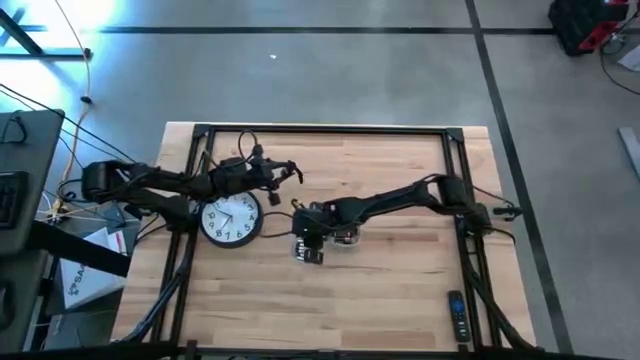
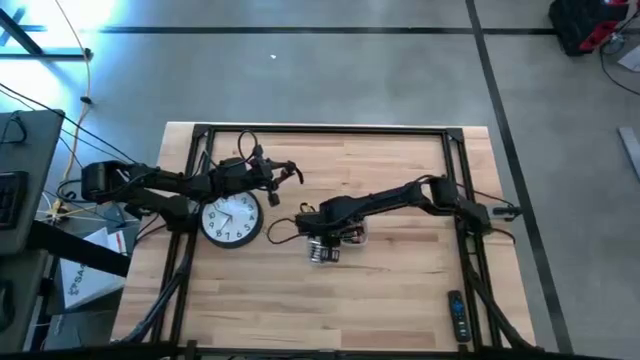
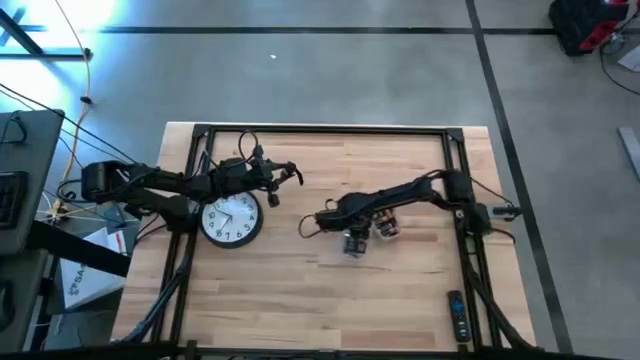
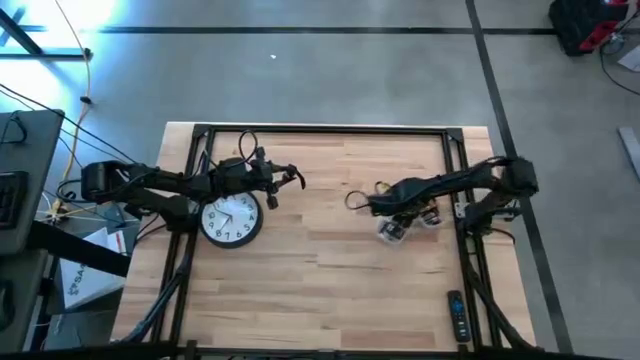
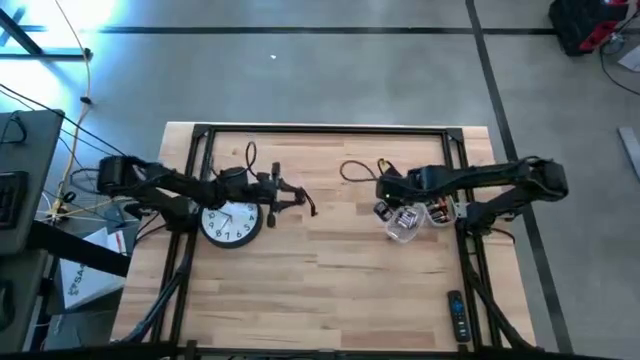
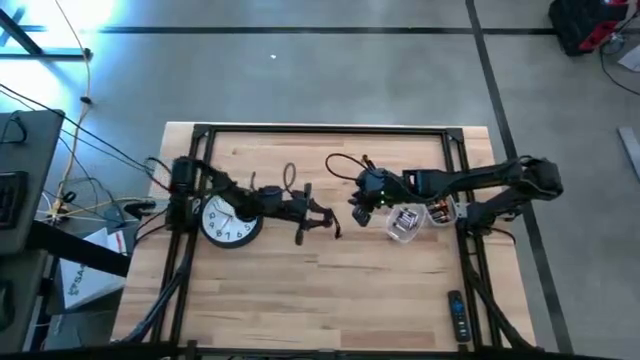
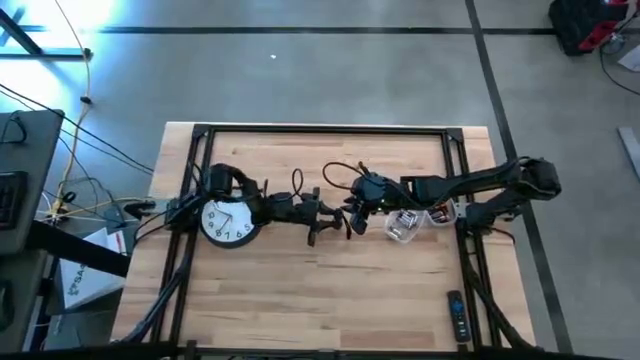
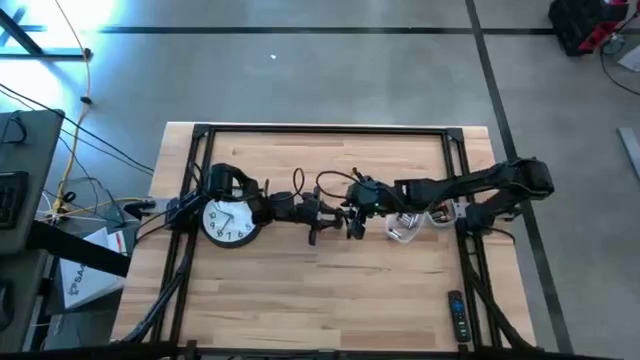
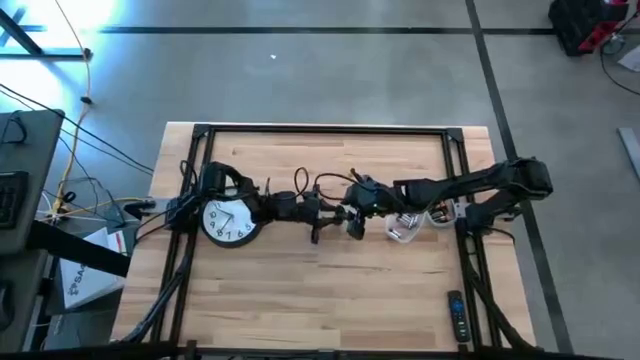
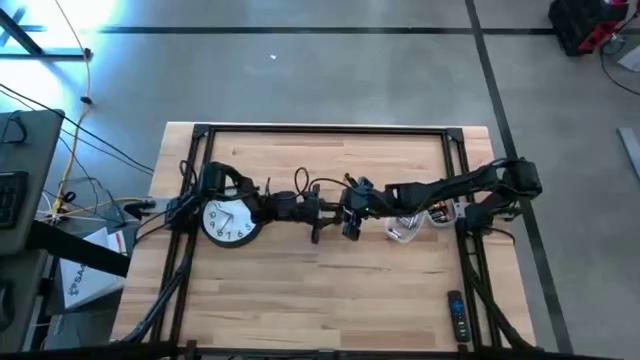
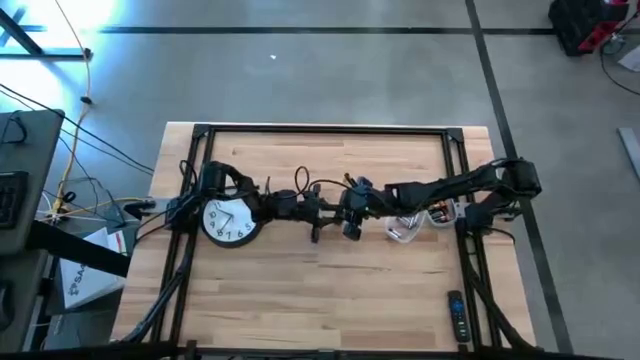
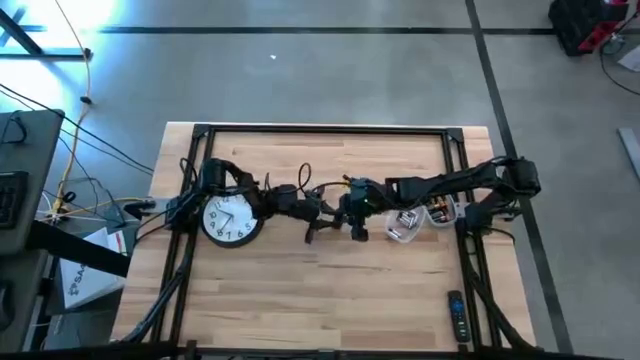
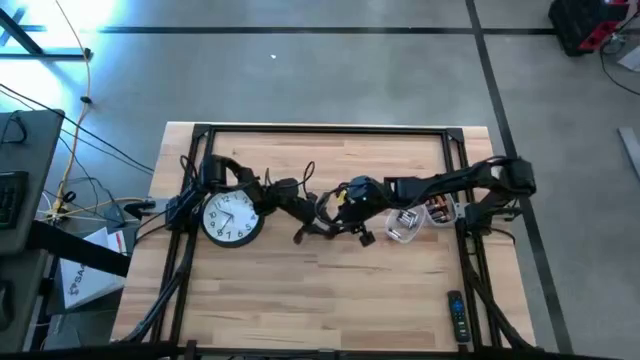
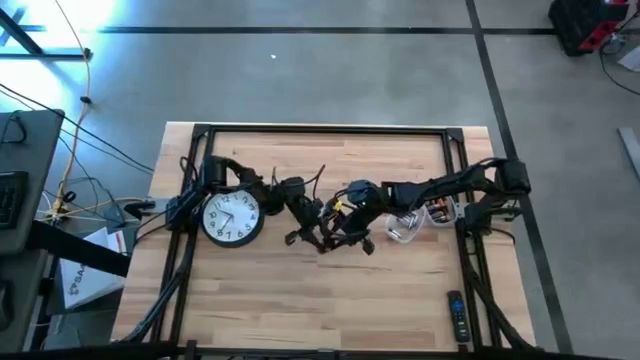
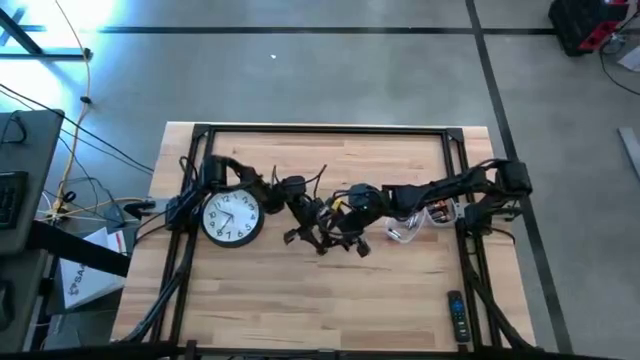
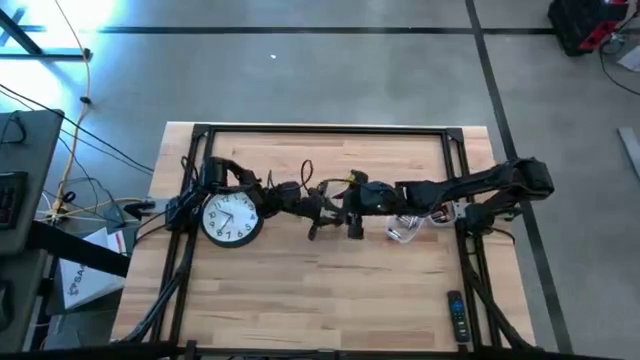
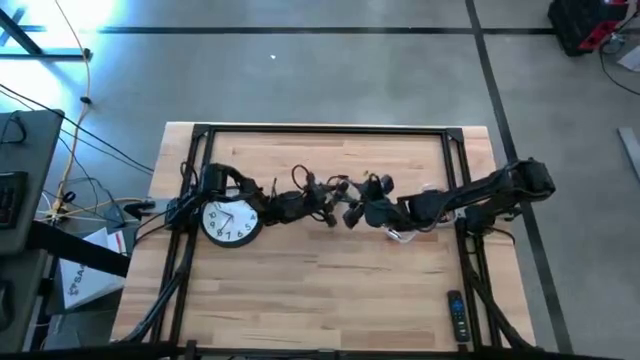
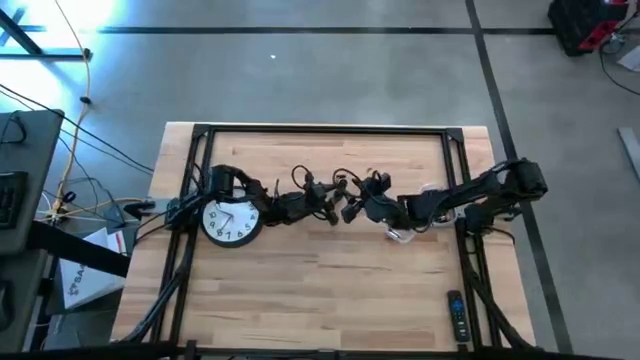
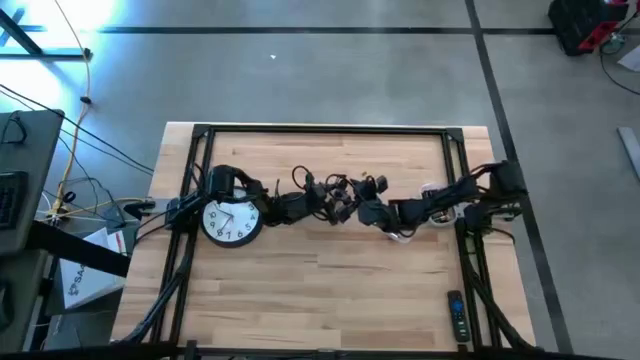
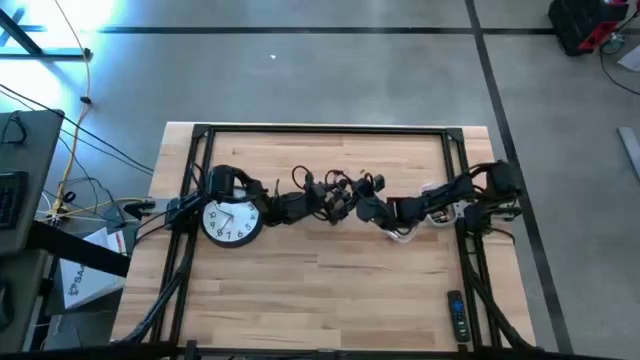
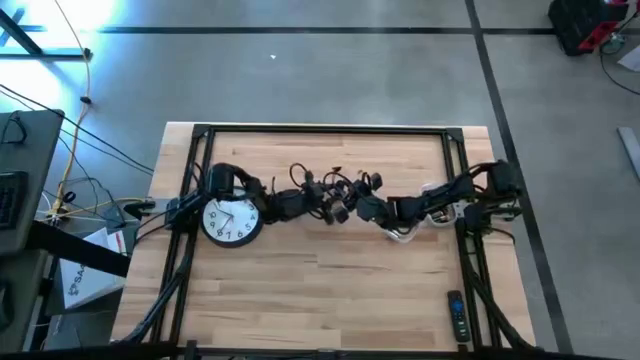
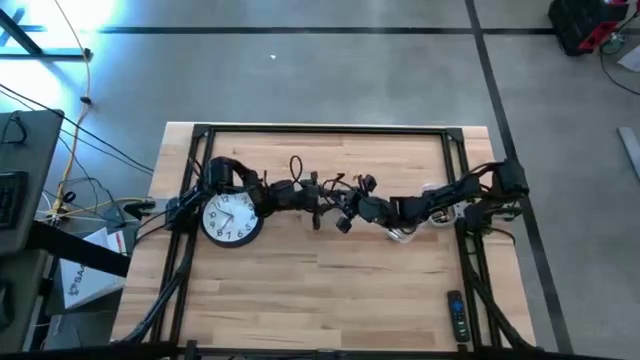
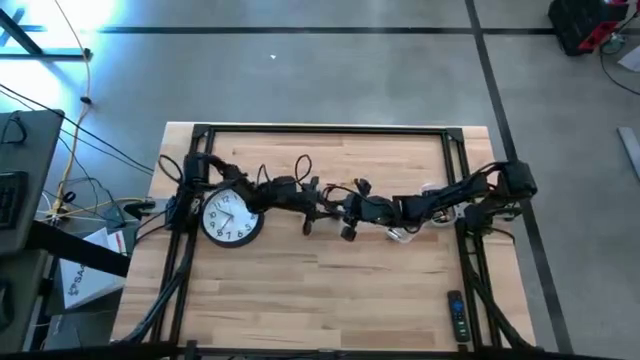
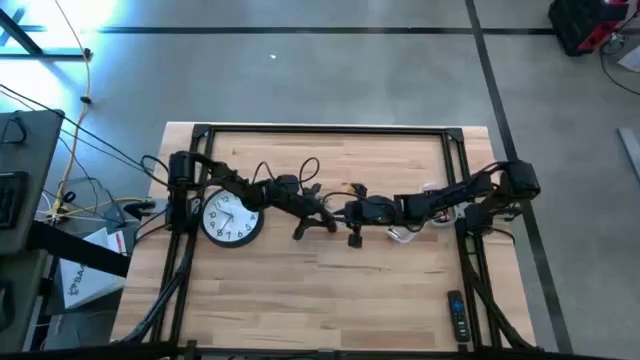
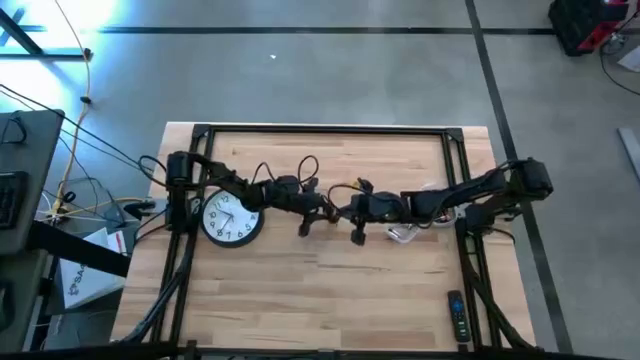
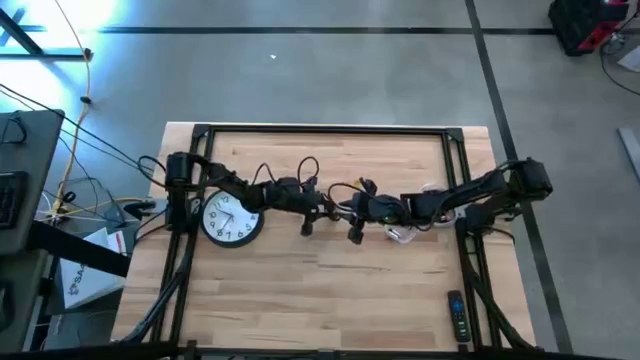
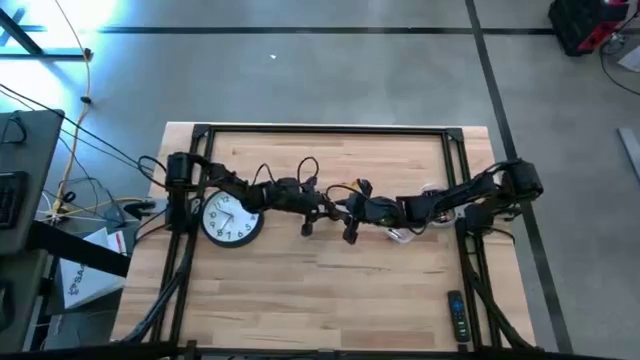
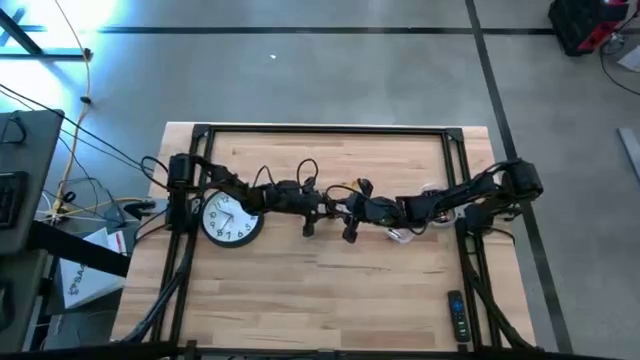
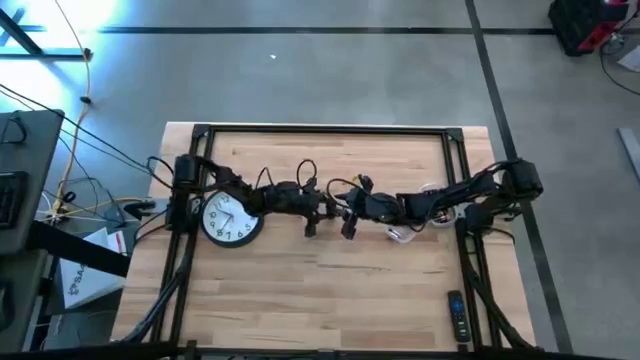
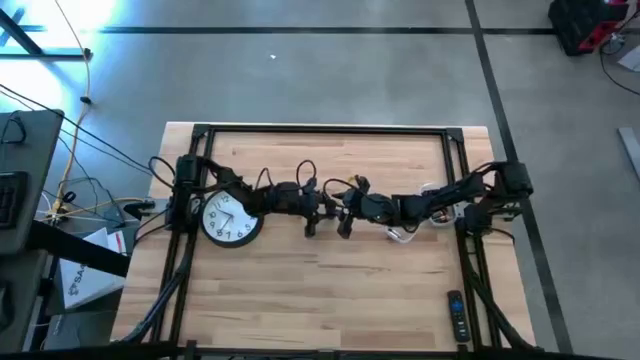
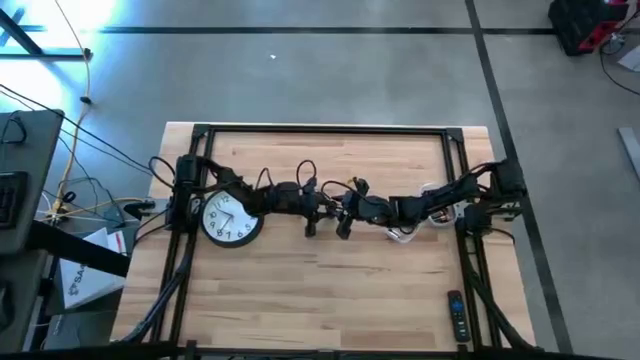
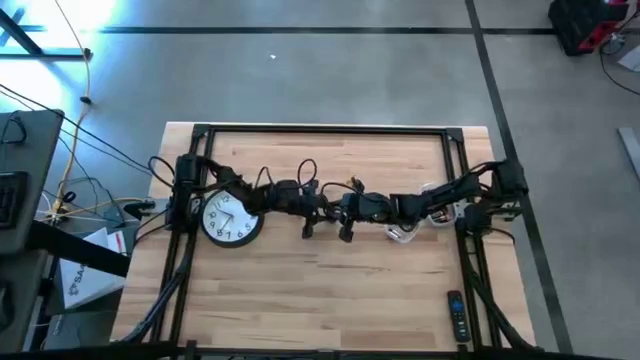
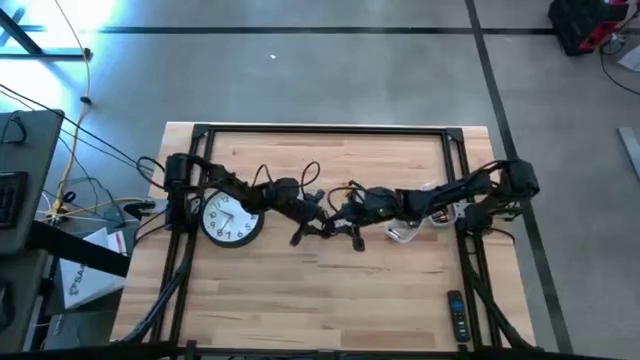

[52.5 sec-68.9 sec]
Task: Insert battery
Open the black flashlight lid

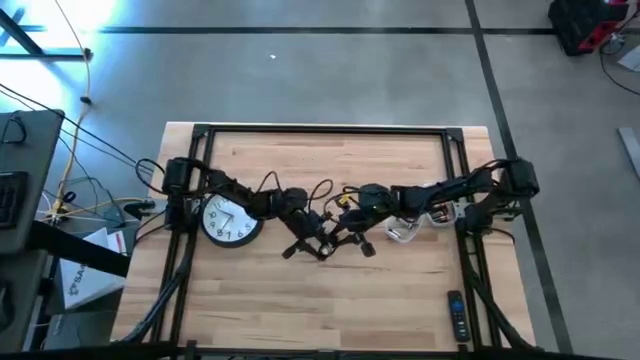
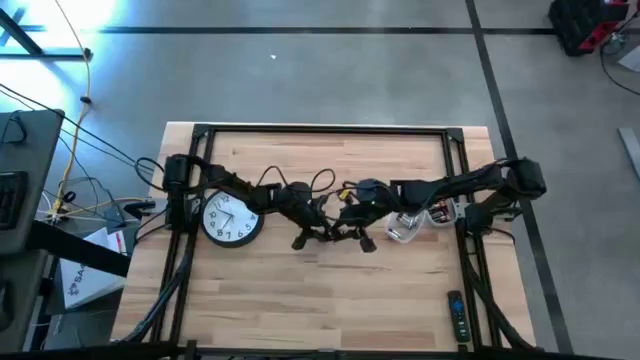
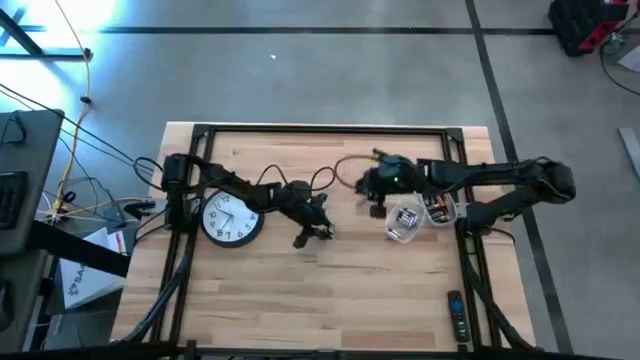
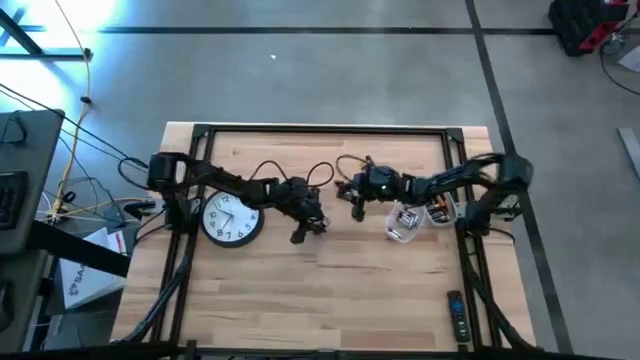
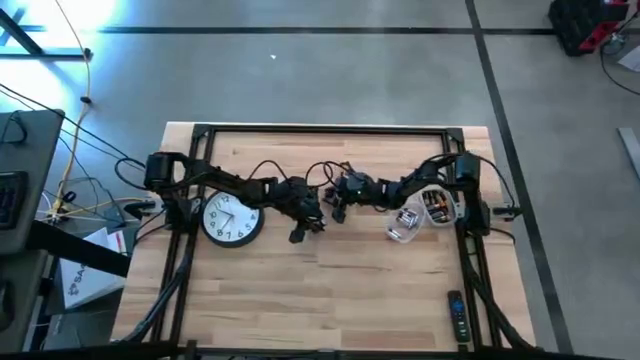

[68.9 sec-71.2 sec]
Put the black flashlight lid on the table

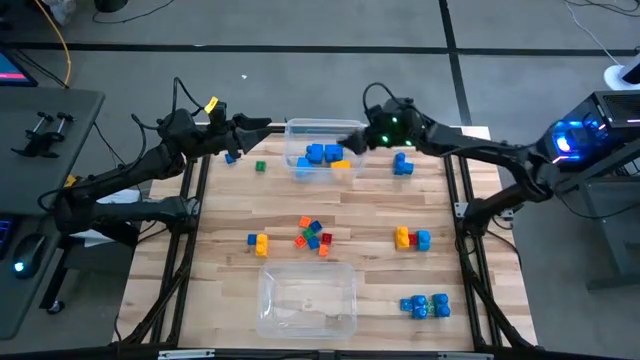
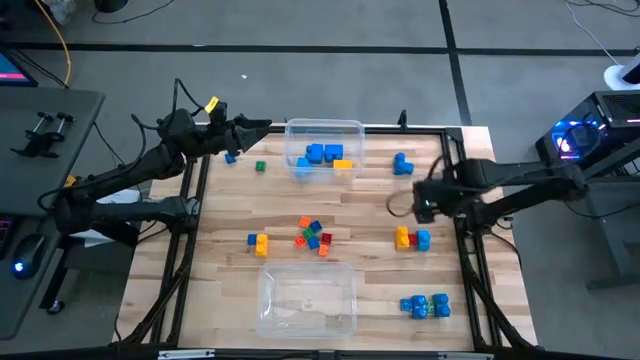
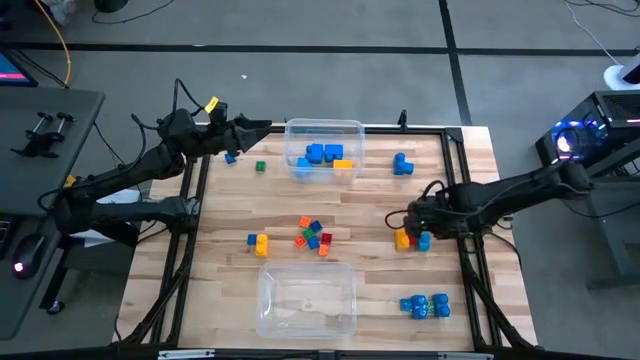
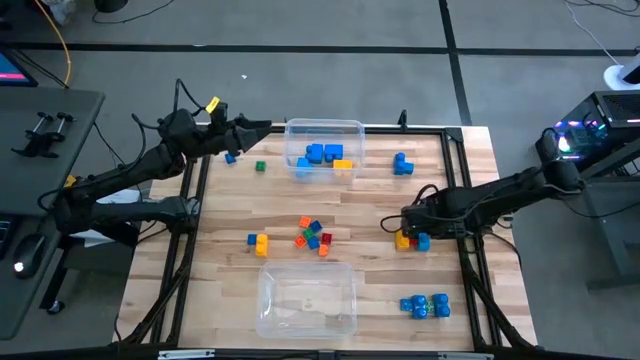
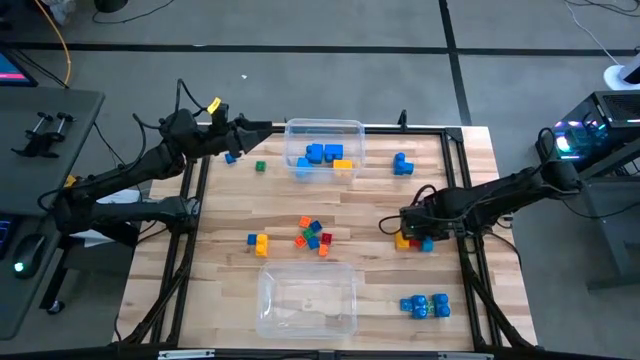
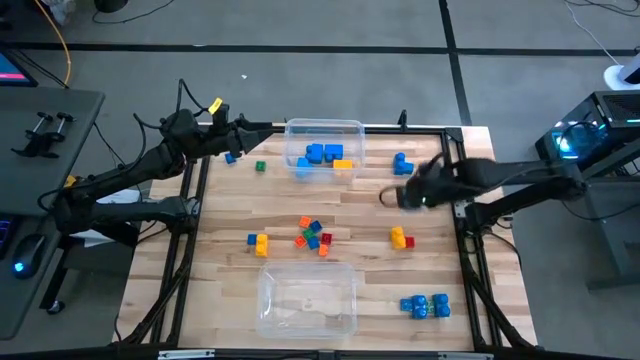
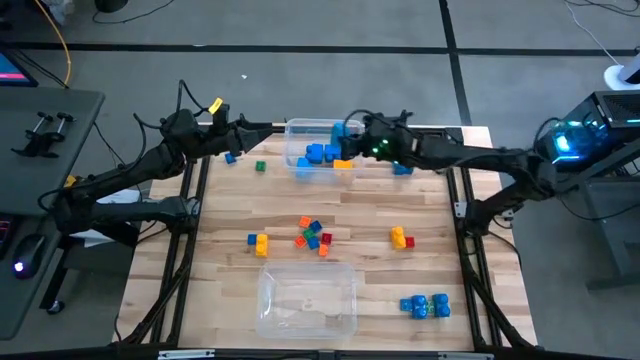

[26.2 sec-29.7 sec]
Task: Sort blocks by size
Put the large blue game piece into the top transparent bin
